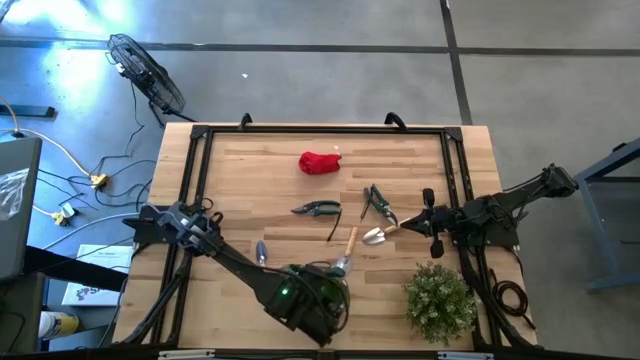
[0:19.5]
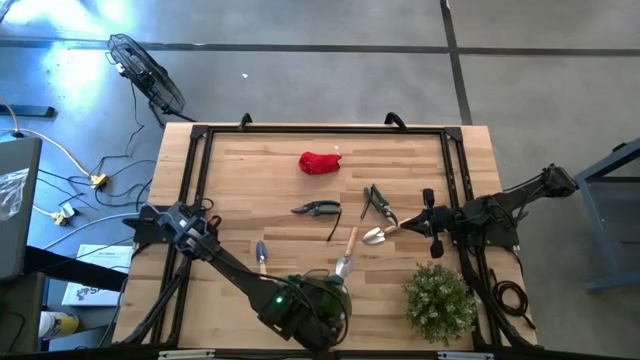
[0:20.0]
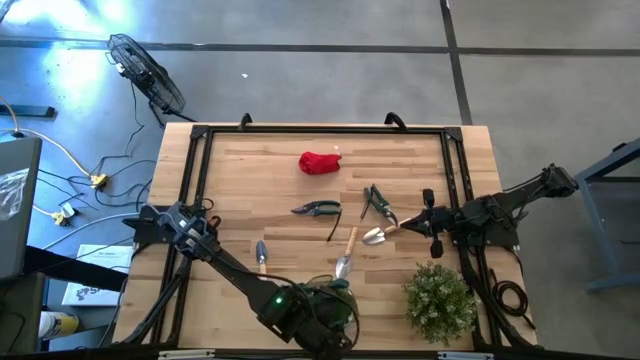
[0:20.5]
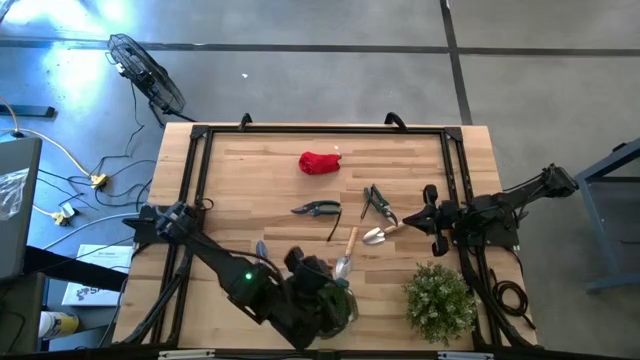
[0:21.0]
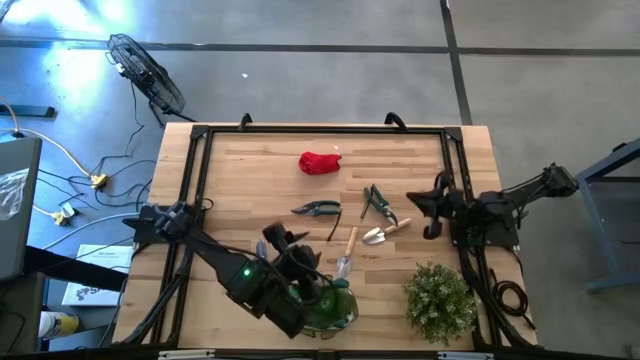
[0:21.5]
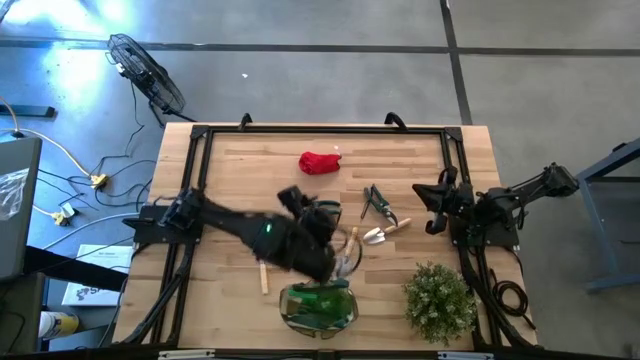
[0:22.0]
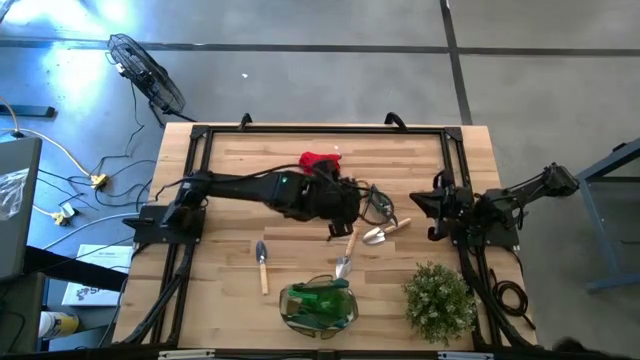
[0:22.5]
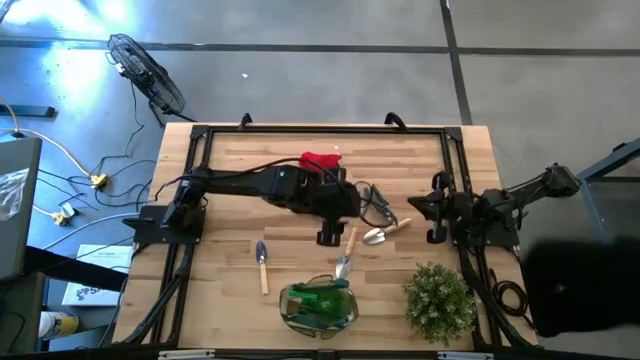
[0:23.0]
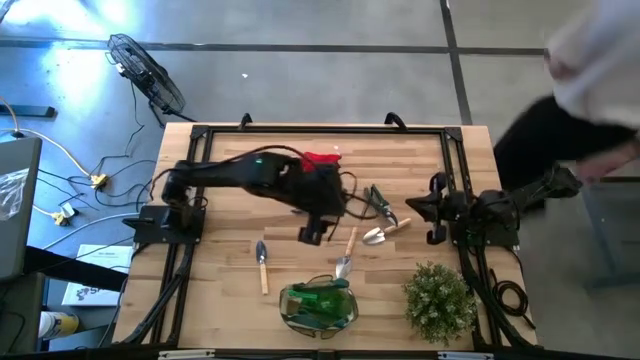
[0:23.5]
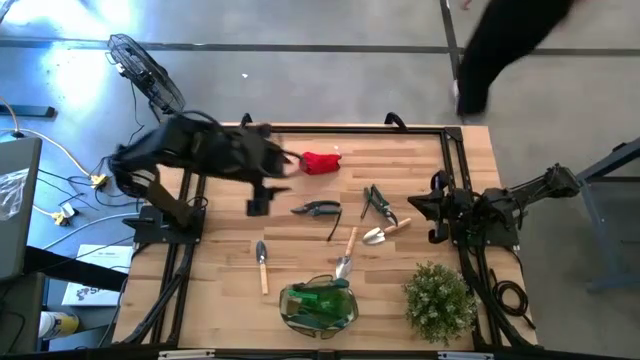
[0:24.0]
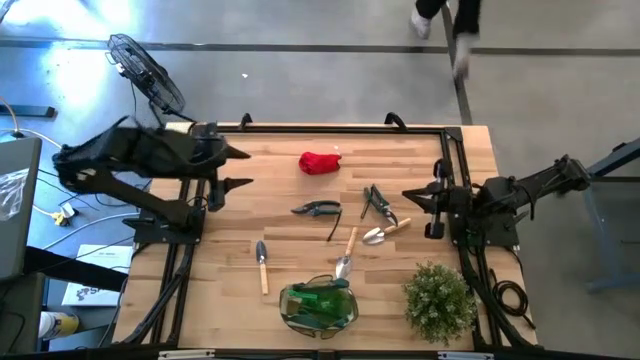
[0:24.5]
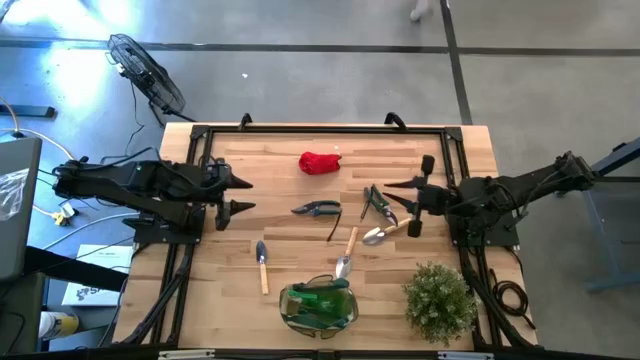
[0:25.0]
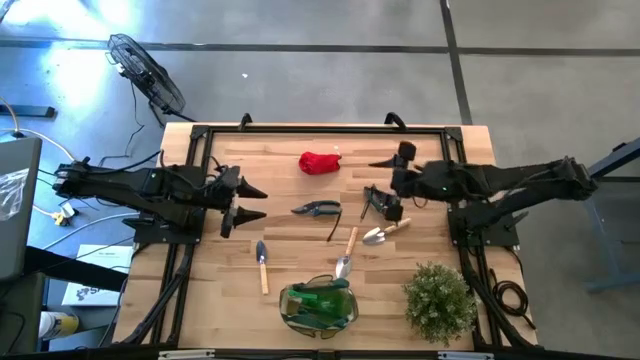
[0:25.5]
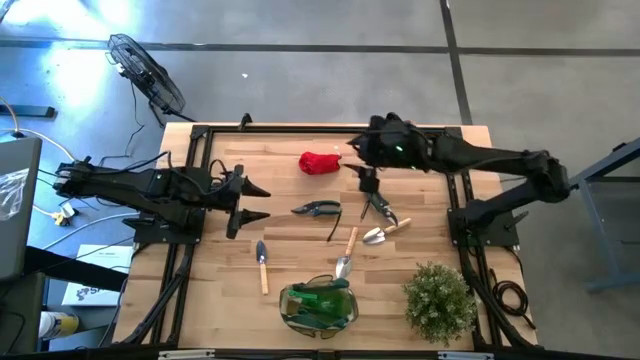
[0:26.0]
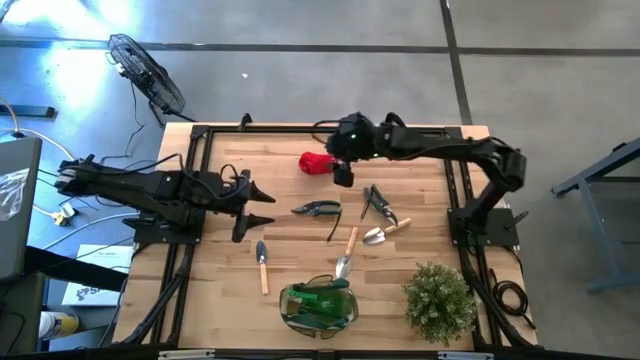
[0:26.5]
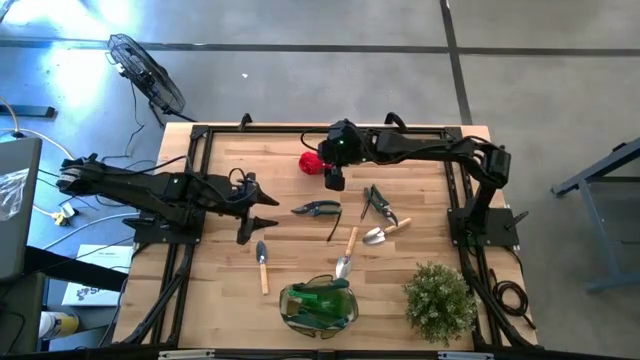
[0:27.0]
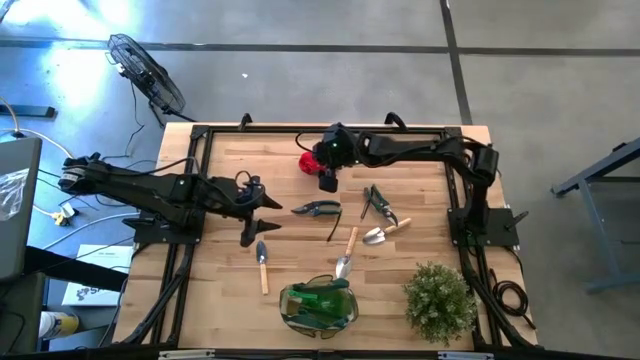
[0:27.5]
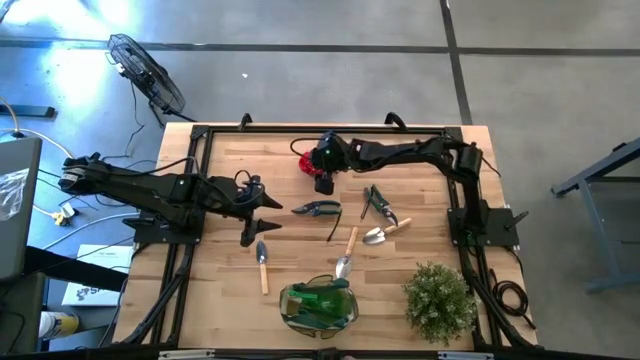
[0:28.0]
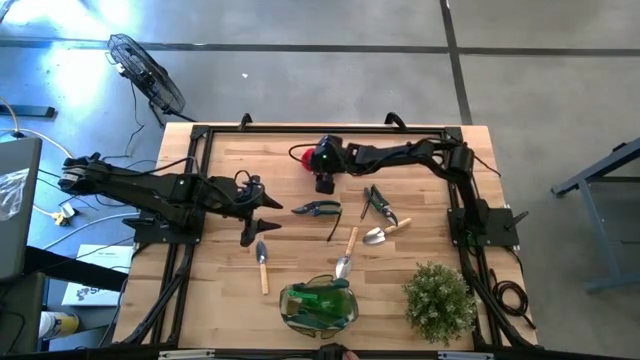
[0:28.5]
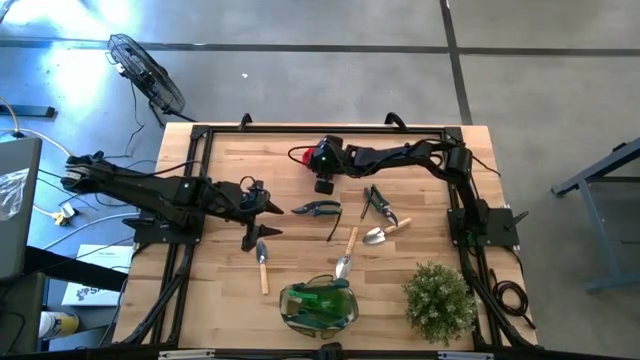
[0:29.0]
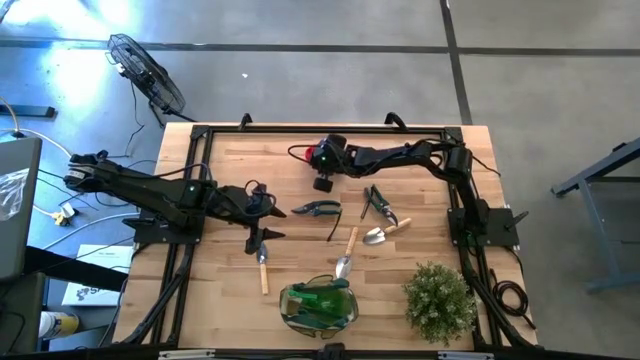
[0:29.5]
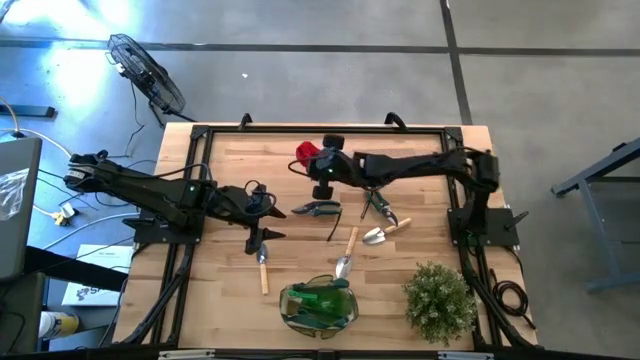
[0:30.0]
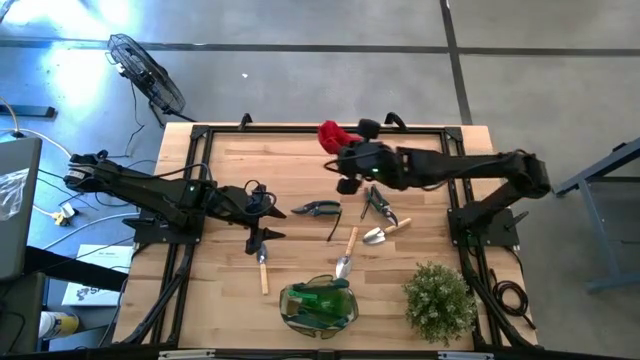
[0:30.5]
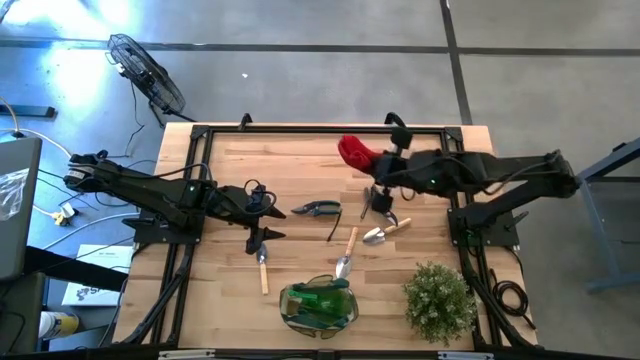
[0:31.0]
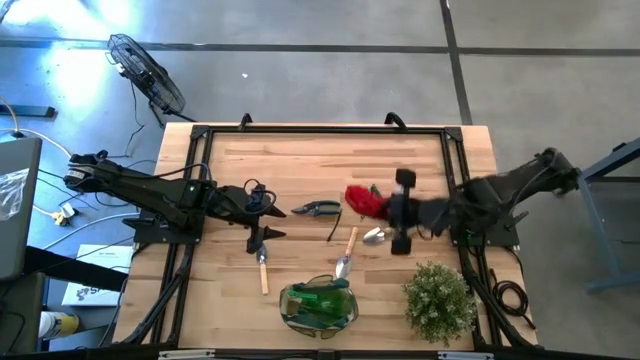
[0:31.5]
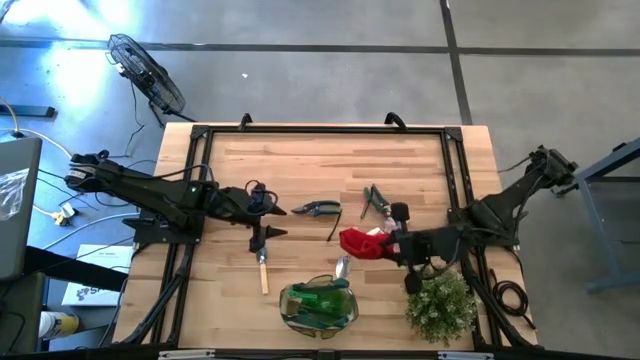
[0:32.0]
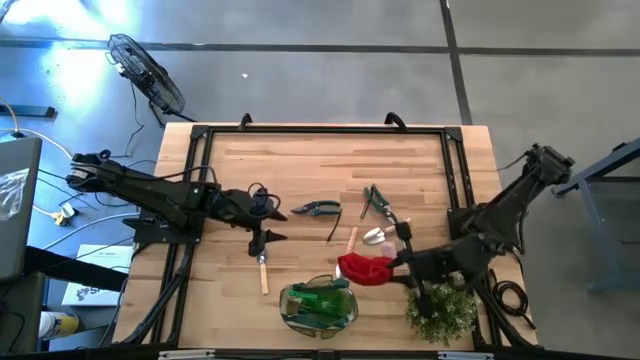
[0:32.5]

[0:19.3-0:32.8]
Task: Pick & Place Garden tools in Gardening bag
Put the red gloves into the green gardening bag

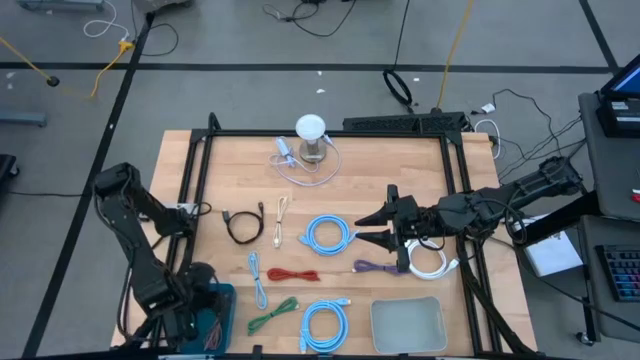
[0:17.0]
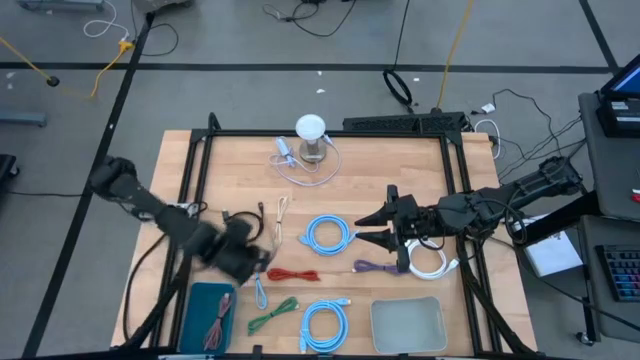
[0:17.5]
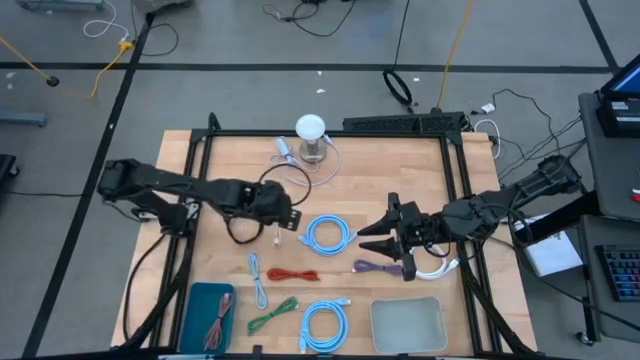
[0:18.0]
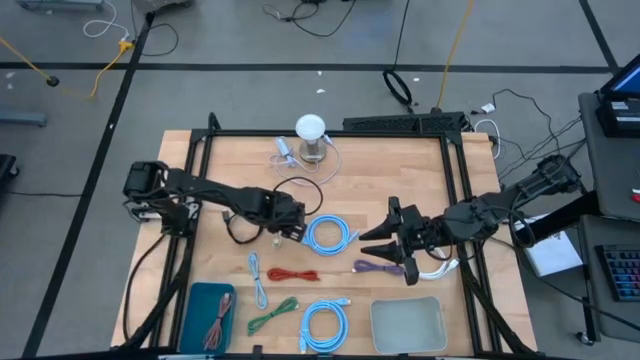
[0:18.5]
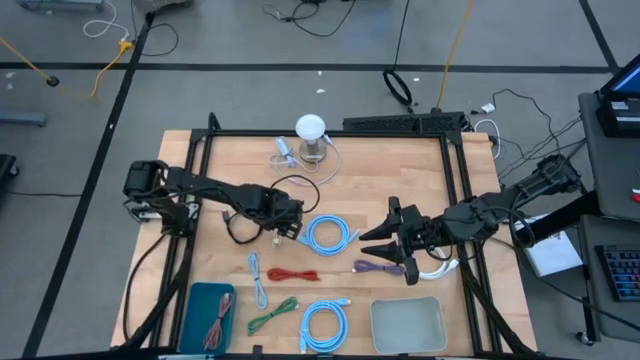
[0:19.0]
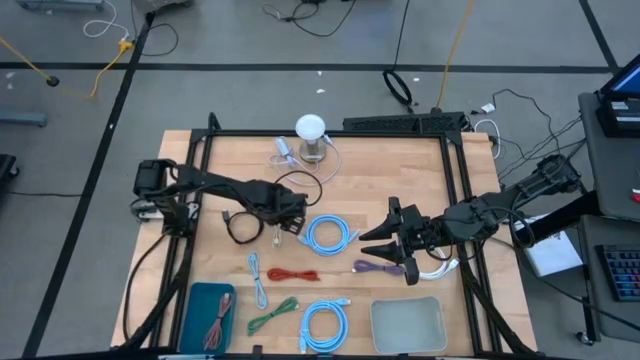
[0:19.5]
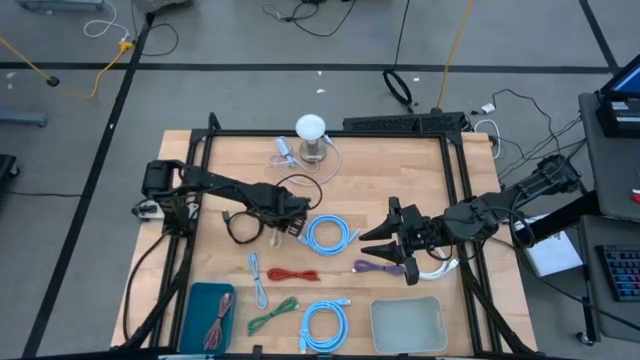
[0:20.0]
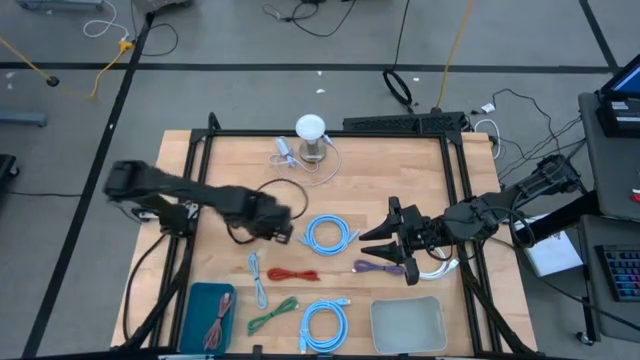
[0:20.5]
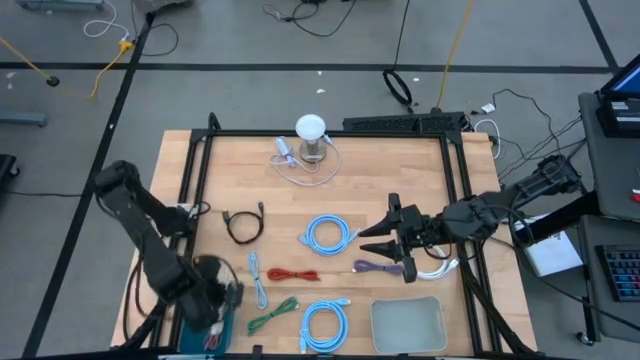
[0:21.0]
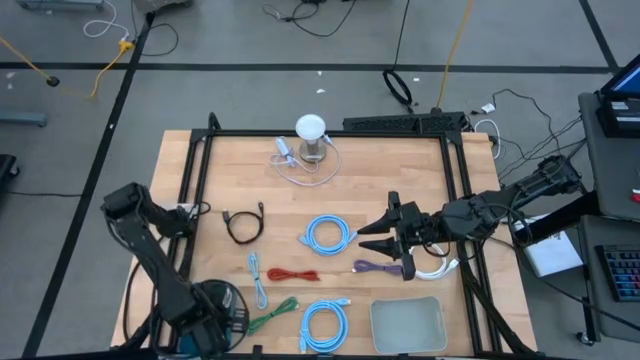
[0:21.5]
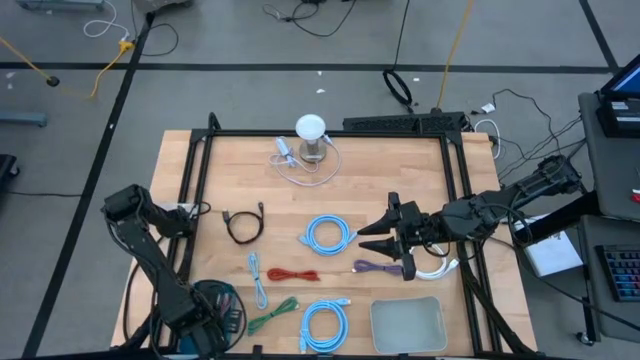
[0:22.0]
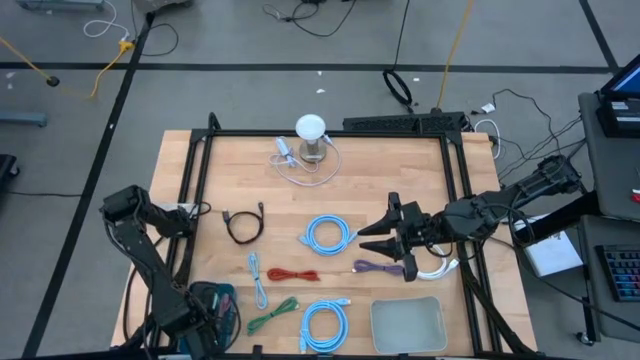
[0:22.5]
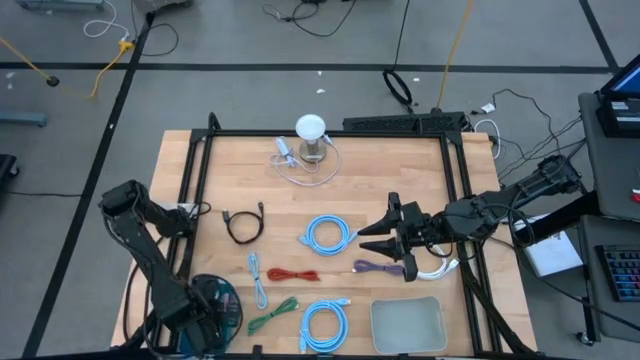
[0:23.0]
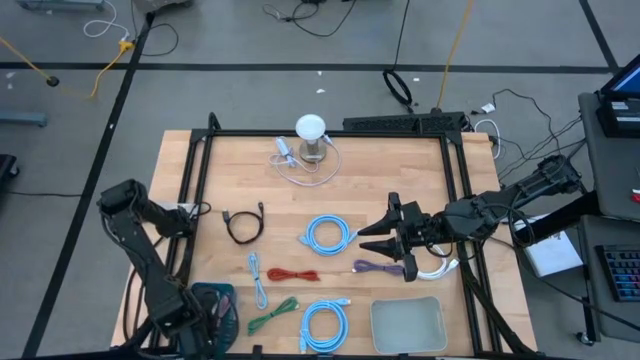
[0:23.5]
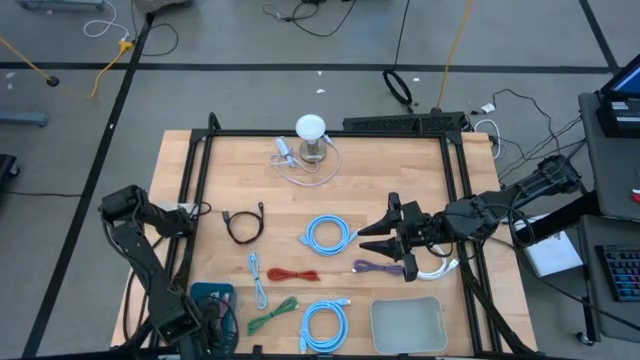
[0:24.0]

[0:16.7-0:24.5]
Task: Pick & Place USB Port
Put the white charger cable into the blue bin
